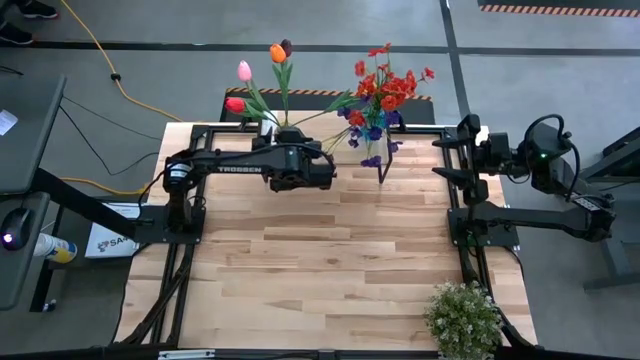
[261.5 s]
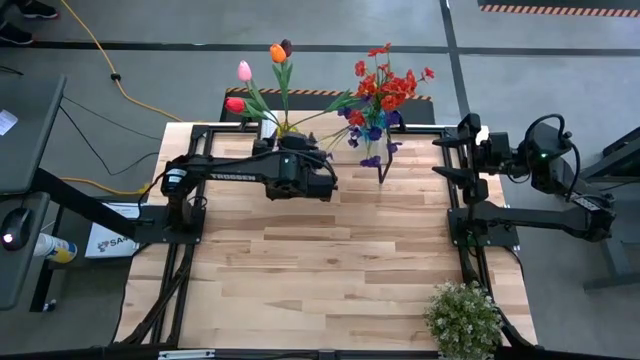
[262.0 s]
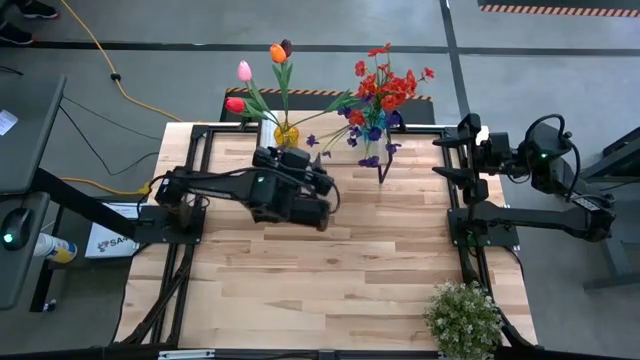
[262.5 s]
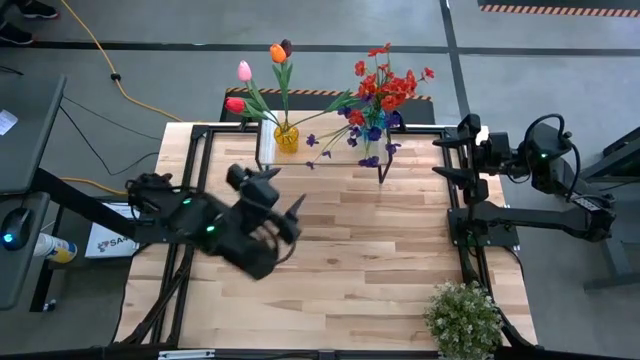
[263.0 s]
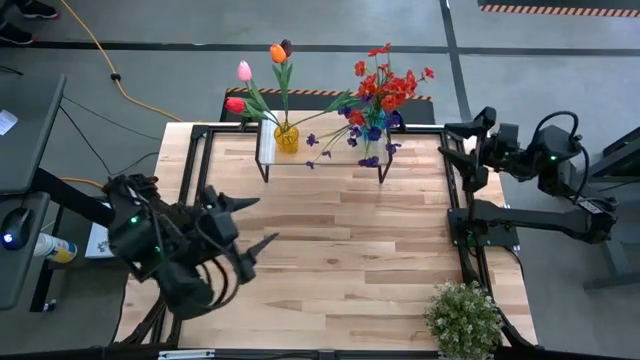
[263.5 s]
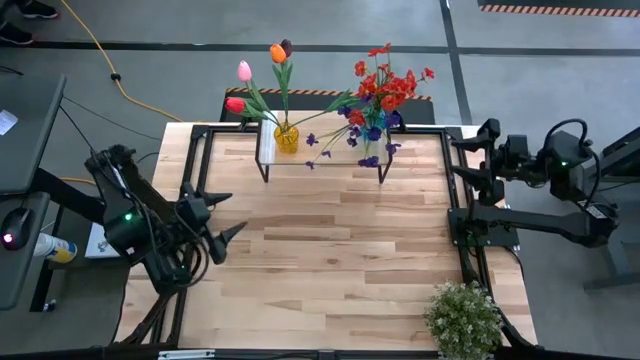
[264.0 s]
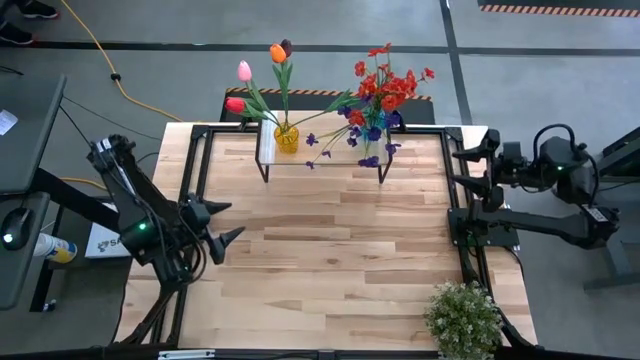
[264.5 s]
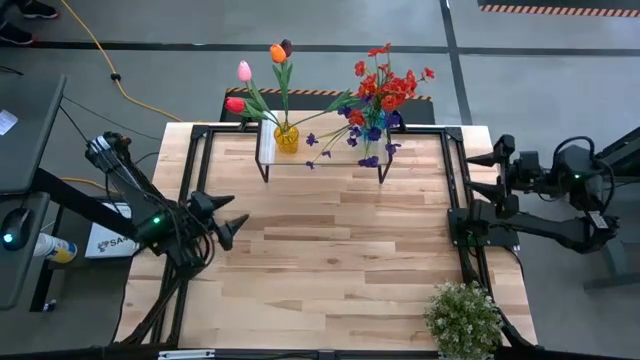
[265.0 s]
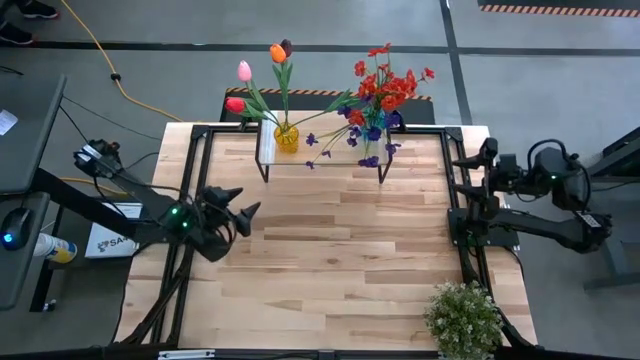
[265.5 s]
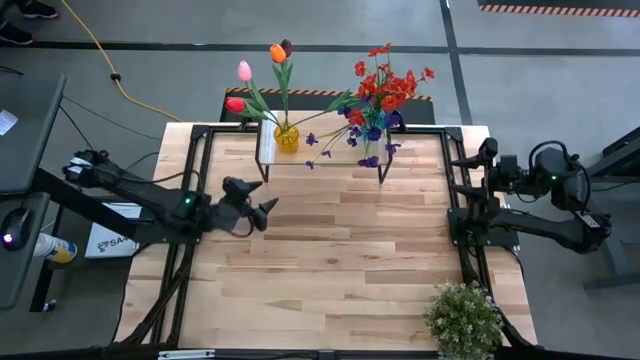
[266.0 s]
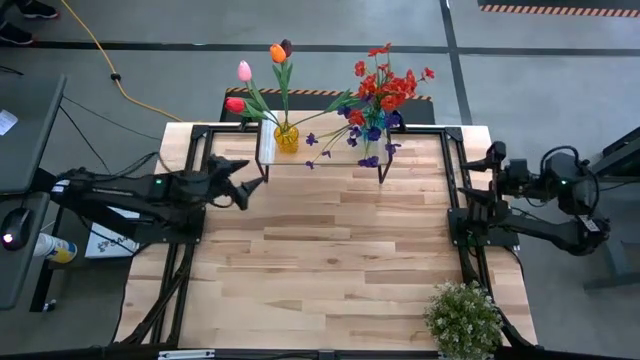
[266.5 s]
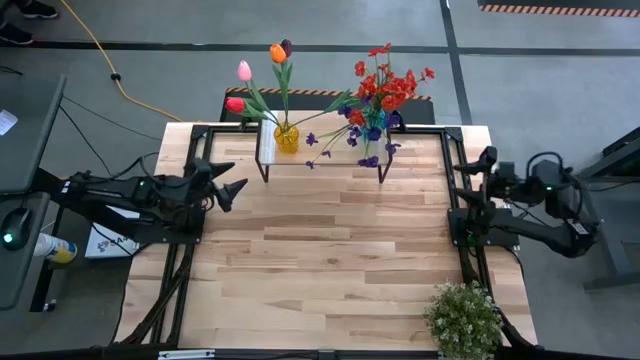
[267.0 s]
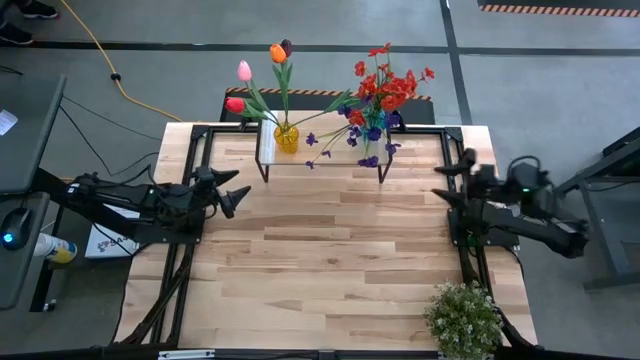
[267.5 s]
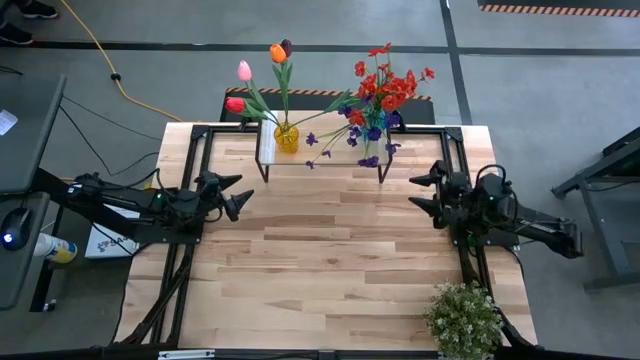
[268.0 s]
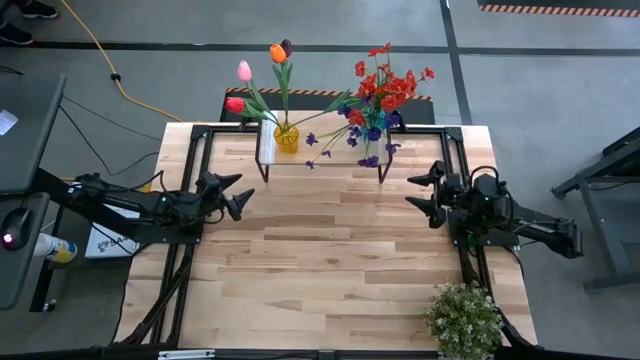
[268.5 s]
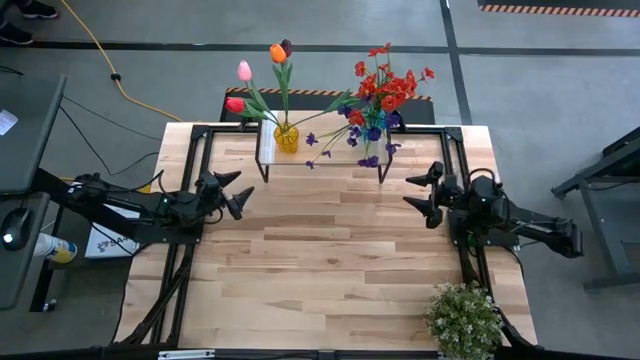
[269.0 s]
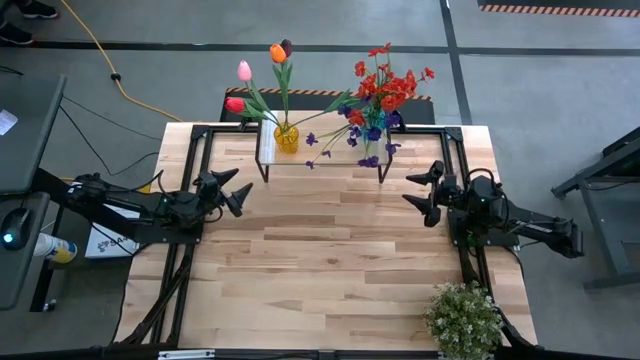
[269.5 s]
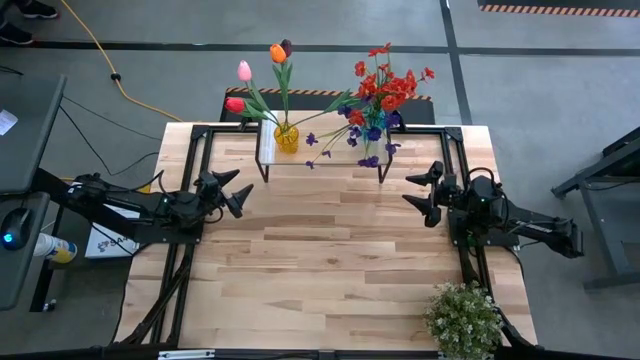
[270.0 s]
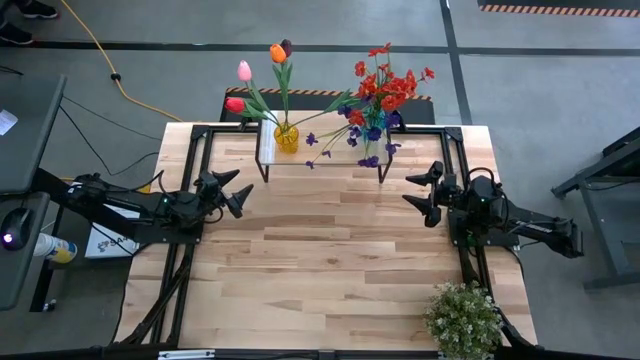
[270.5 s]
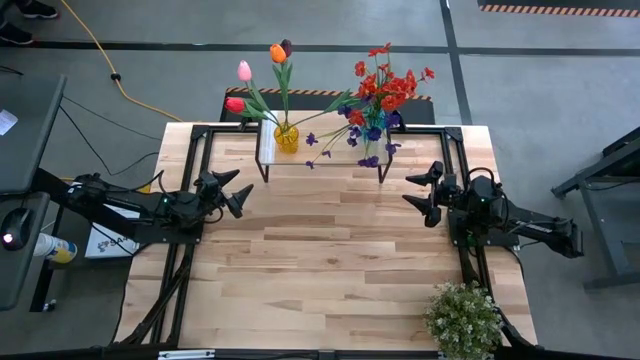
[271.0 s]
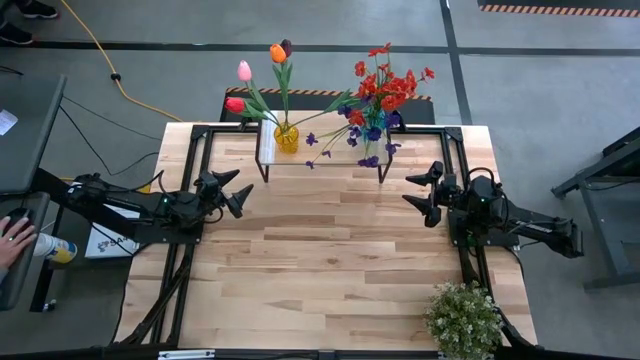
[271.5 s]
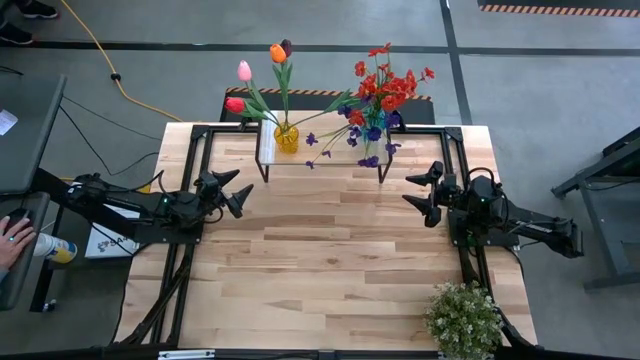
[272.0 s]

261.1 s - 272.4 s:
Task: Pick and place flowers into a vace then onto a shelf
Return to Home Position

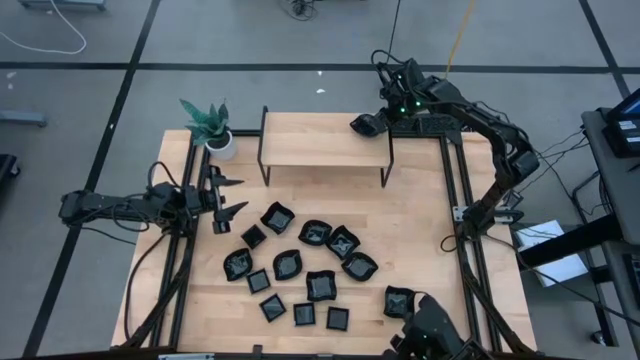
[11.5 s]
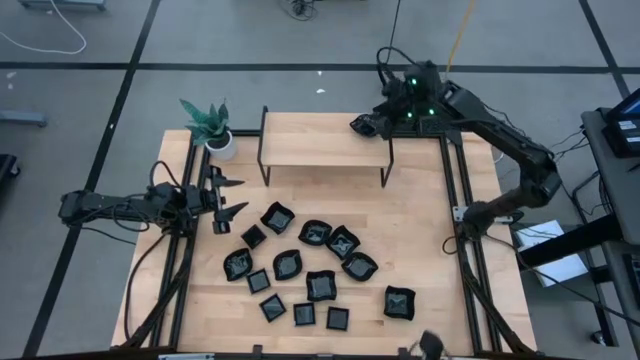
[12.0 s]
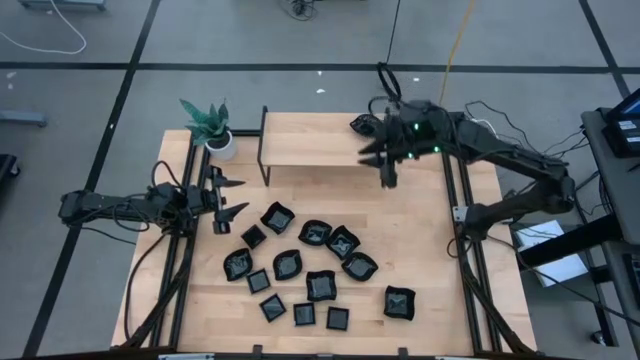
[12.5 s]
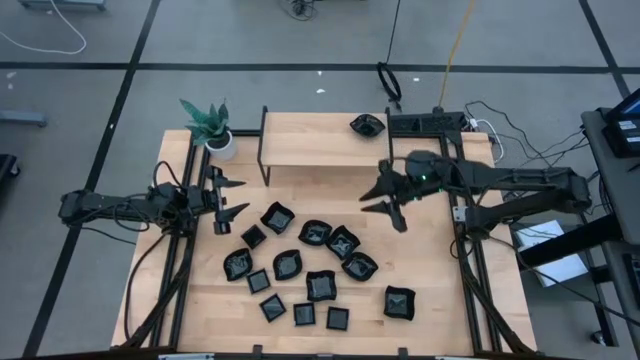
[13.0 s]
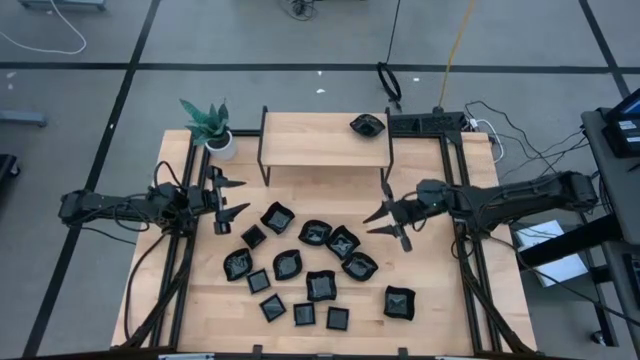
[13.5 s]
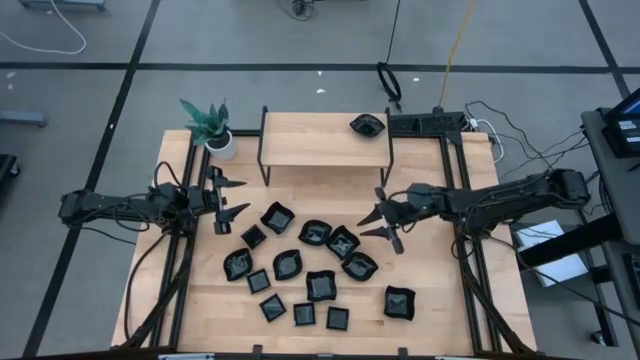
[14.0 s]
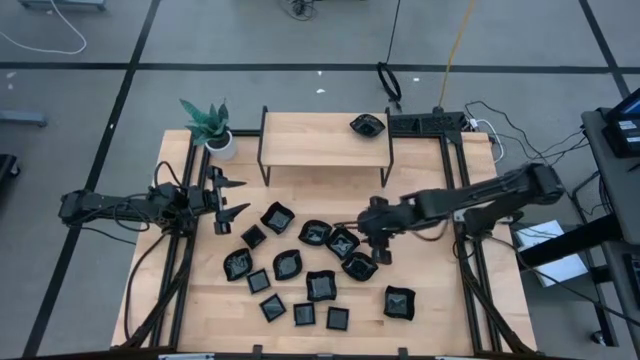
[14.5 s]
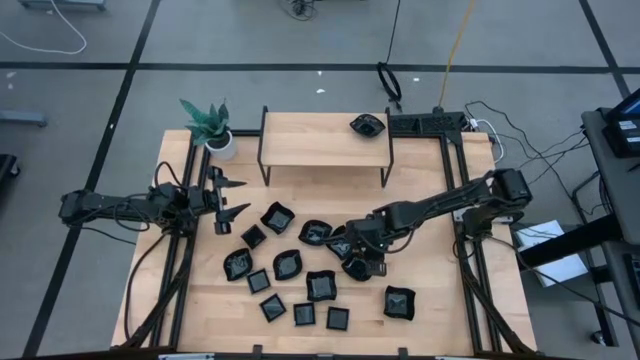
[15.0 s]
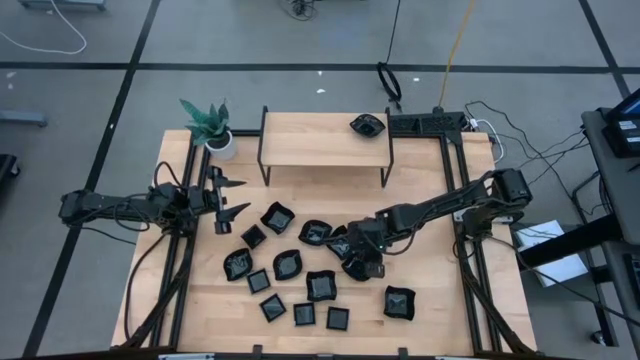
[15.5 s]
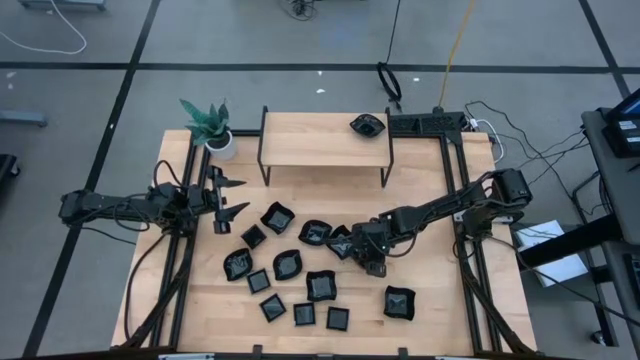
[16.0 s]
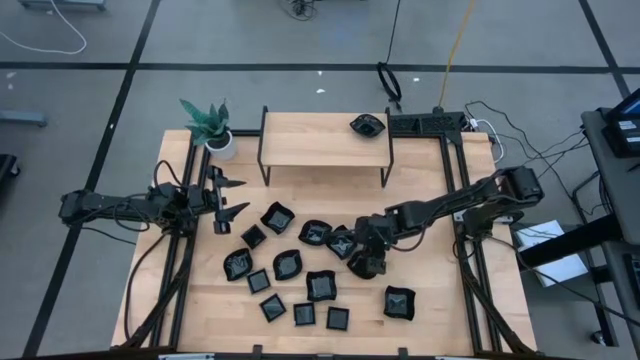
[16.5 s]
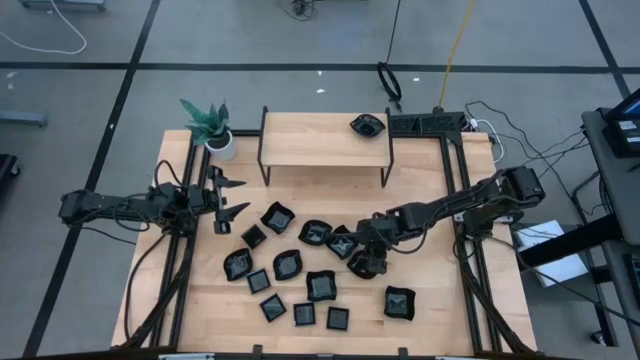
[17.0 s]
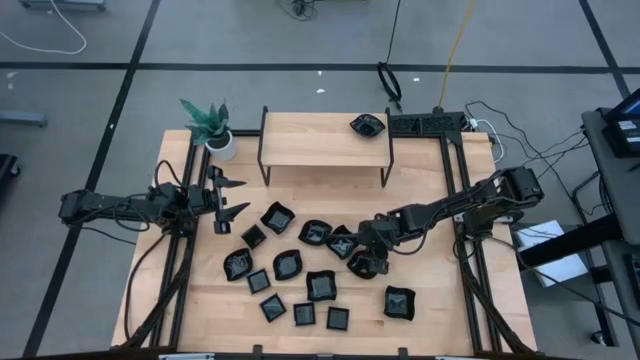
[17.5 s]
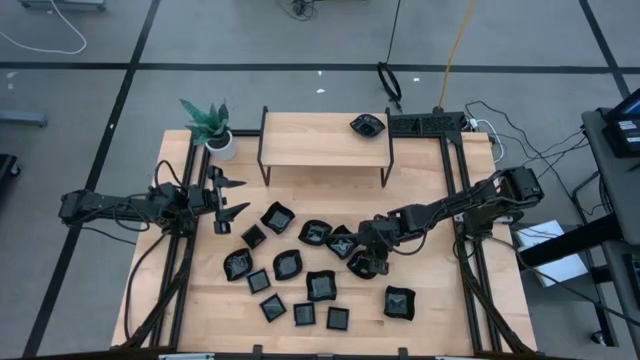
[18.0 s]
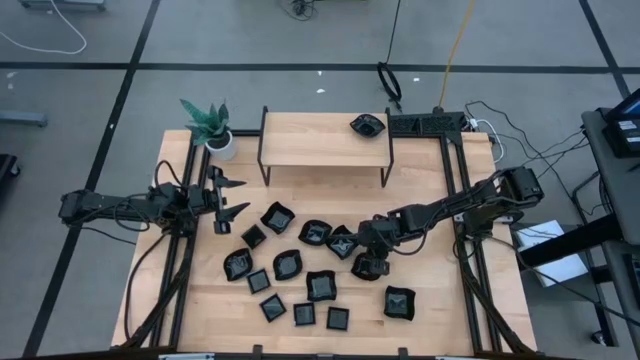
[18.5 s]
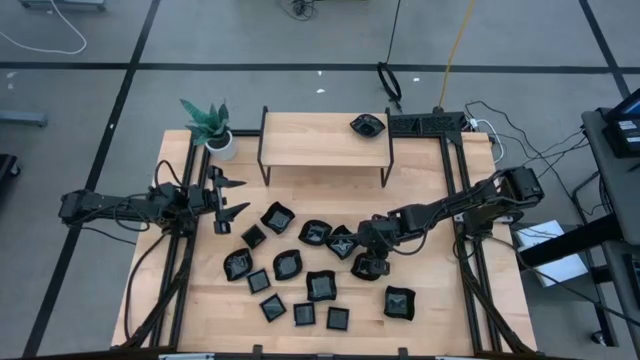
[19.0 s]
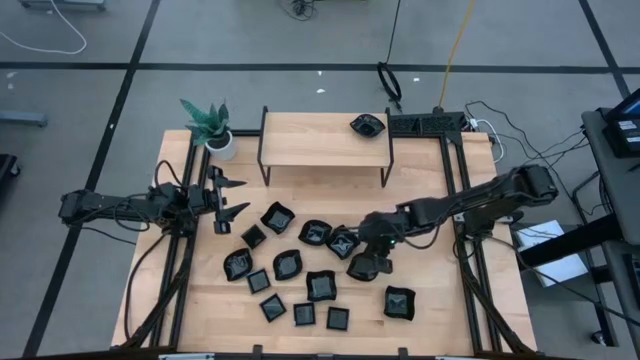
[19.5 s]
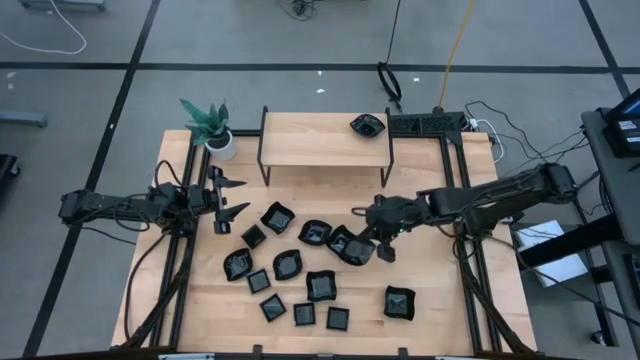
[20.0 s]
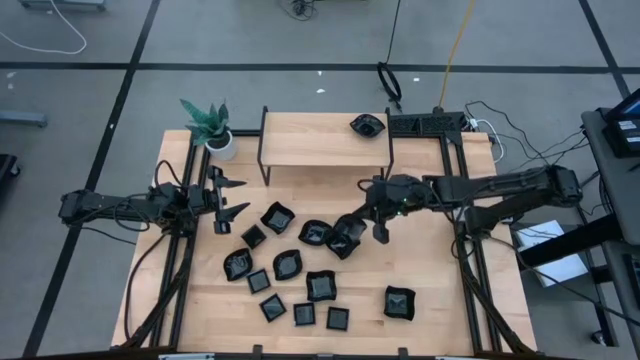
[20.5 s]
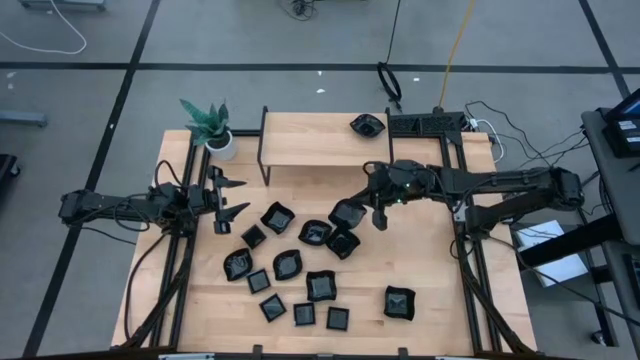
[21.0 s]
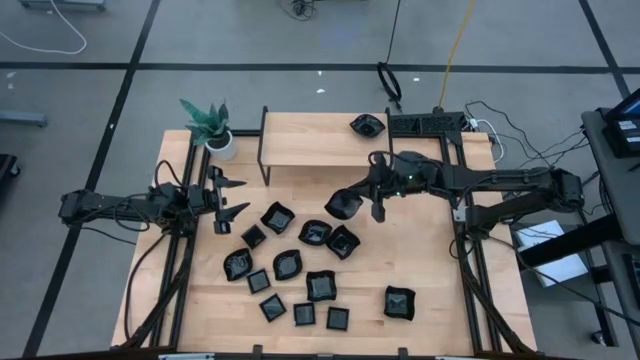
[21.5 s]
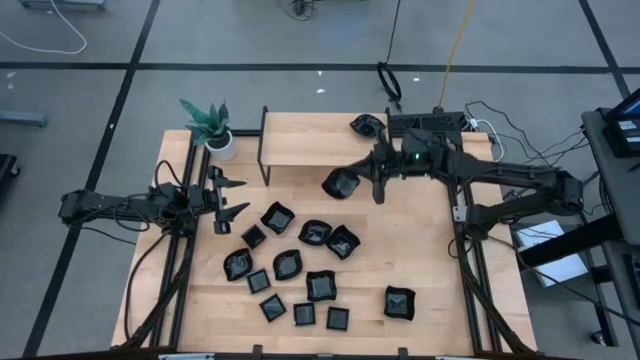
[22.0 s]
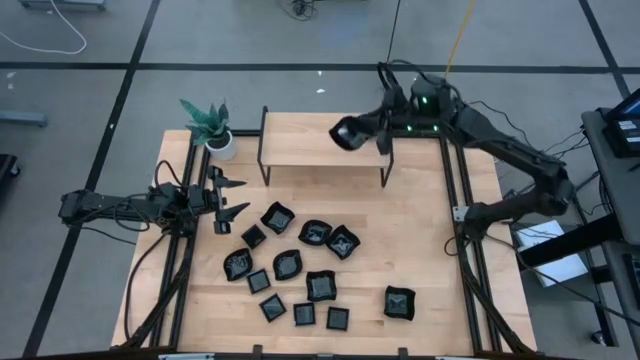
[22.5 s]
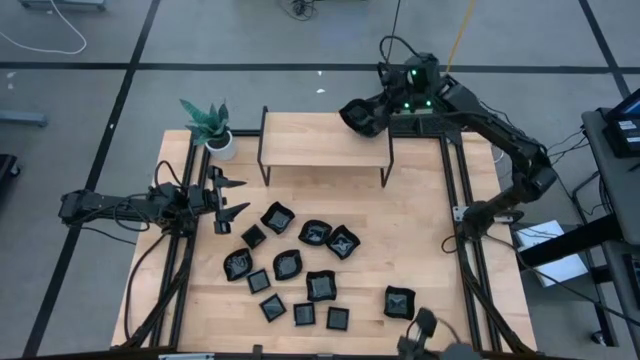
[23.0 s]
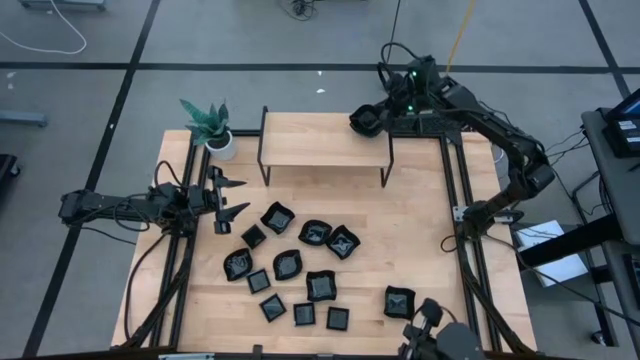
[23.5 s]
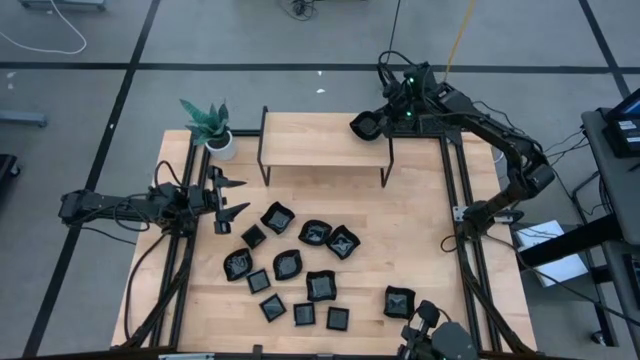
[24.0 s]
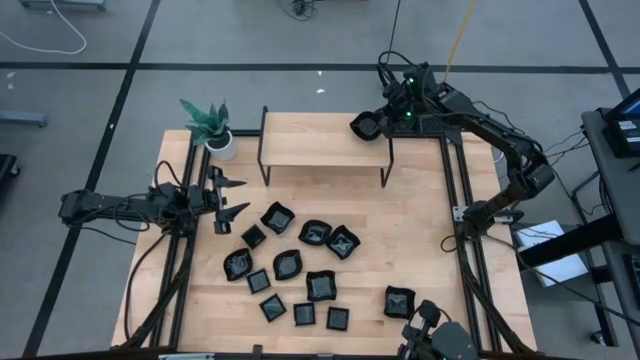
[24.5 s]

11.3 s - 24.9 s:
Task: Pick & Place Mini shaped plates
Stack the black leaf-shaped plate on top of the other black leaf-shaped plate on the shelf
